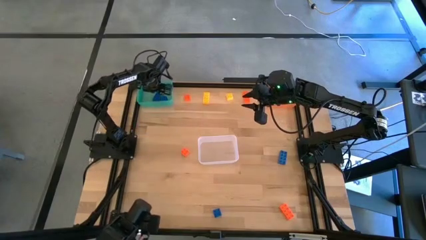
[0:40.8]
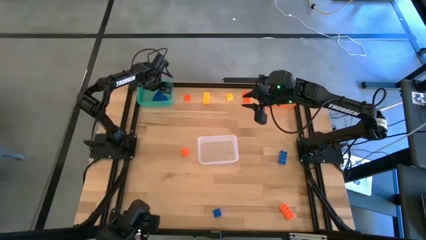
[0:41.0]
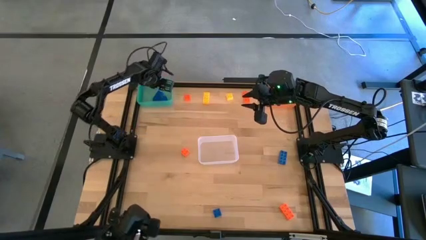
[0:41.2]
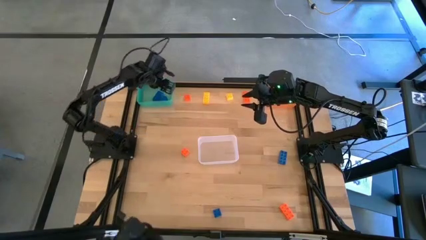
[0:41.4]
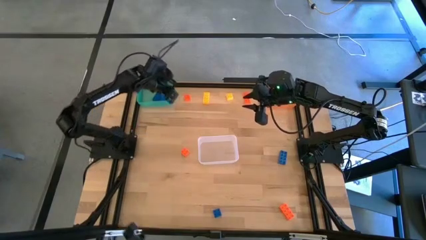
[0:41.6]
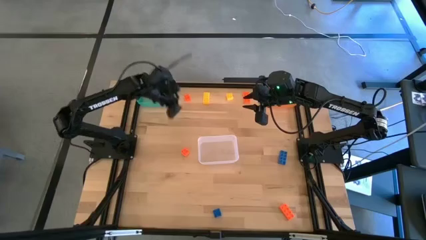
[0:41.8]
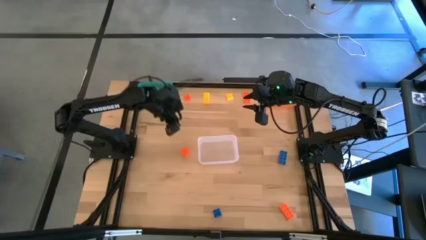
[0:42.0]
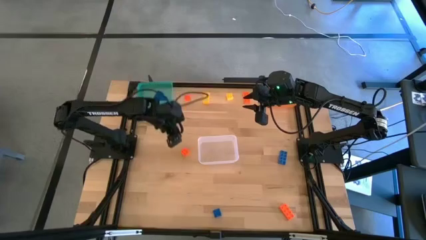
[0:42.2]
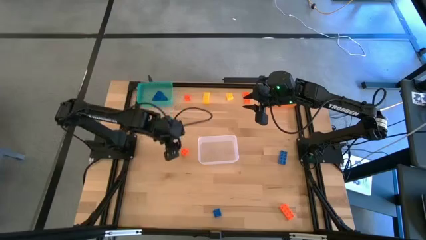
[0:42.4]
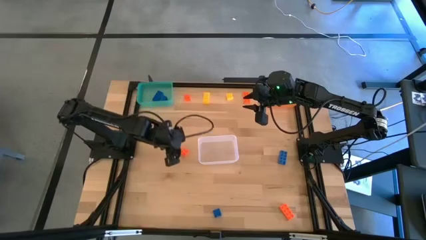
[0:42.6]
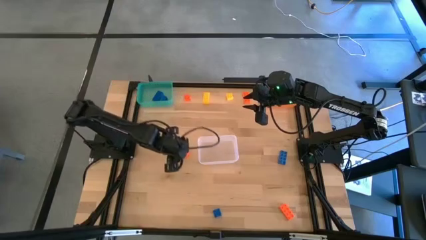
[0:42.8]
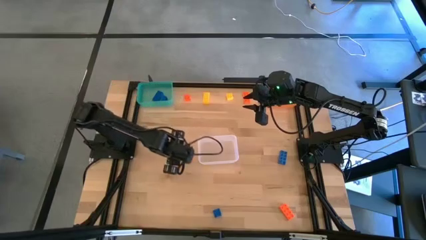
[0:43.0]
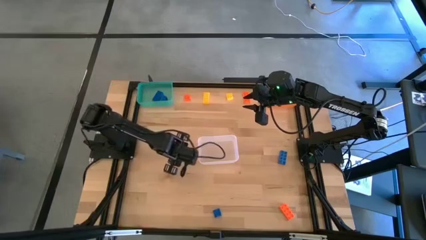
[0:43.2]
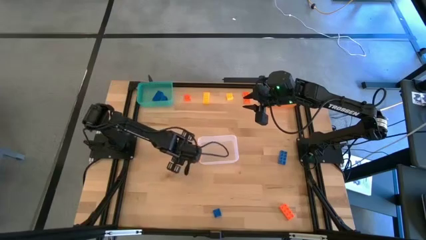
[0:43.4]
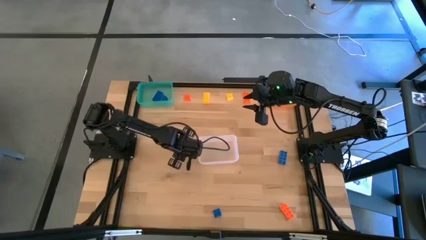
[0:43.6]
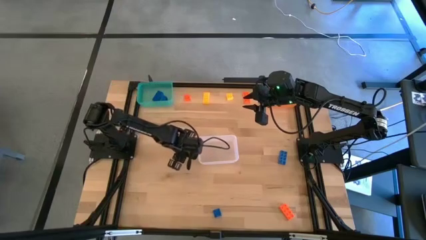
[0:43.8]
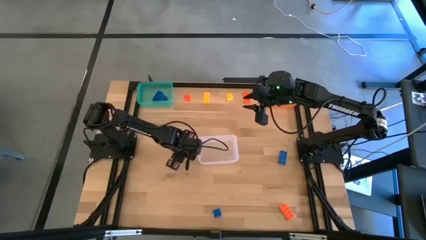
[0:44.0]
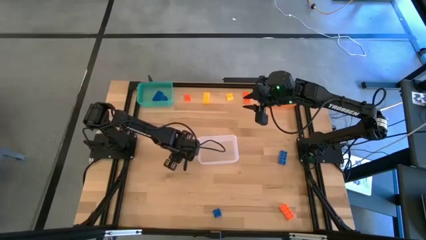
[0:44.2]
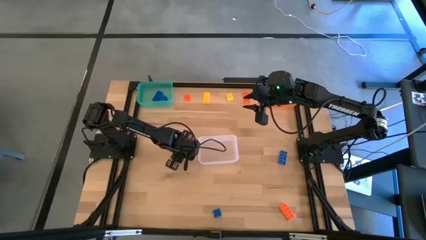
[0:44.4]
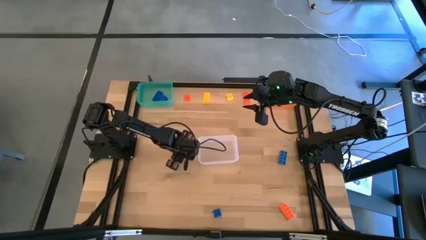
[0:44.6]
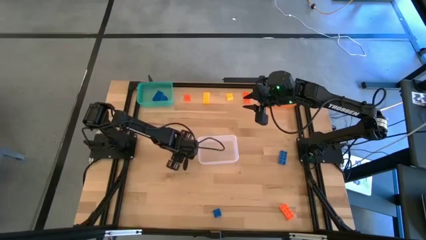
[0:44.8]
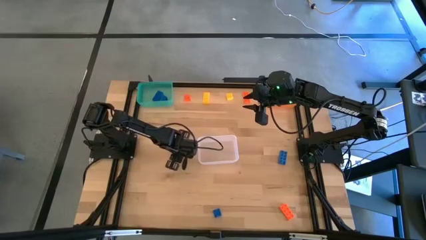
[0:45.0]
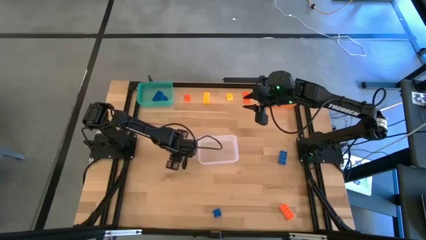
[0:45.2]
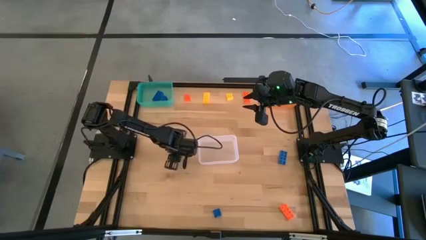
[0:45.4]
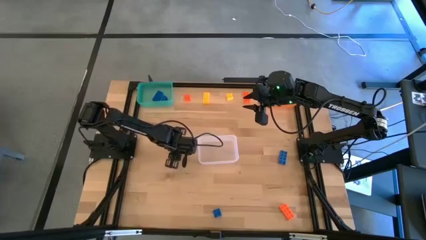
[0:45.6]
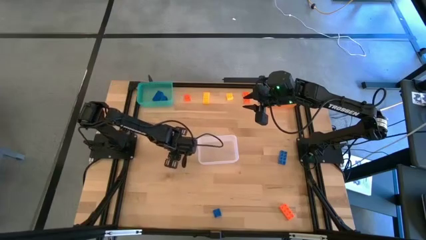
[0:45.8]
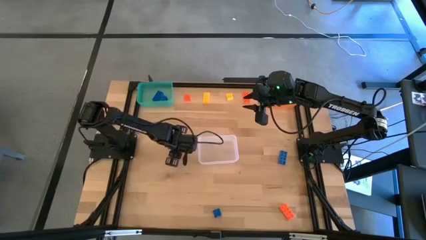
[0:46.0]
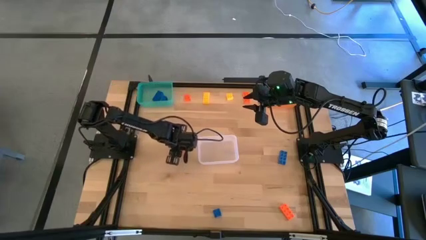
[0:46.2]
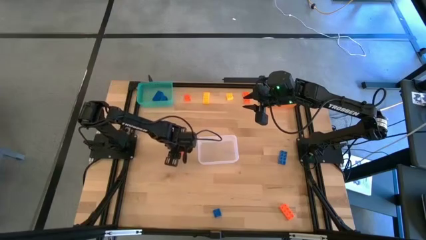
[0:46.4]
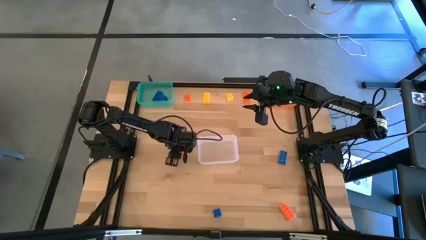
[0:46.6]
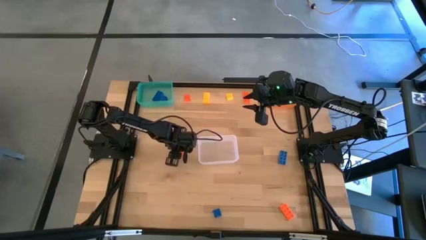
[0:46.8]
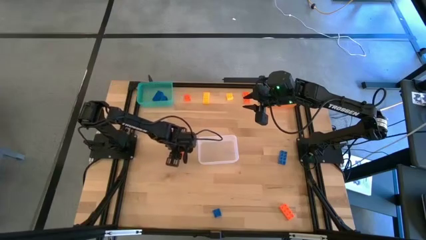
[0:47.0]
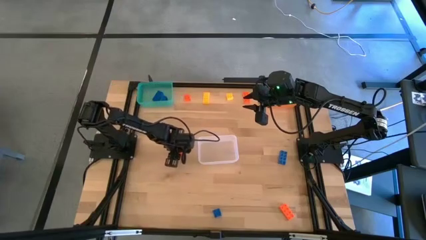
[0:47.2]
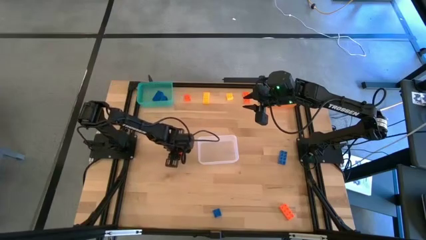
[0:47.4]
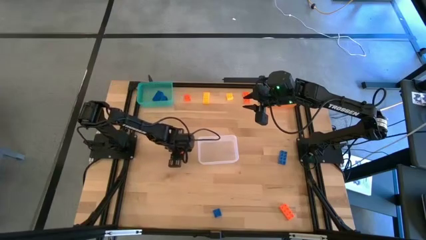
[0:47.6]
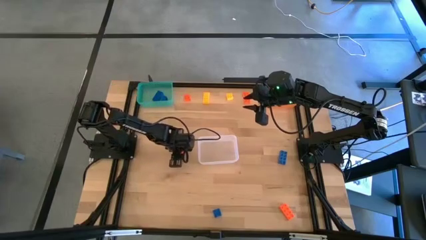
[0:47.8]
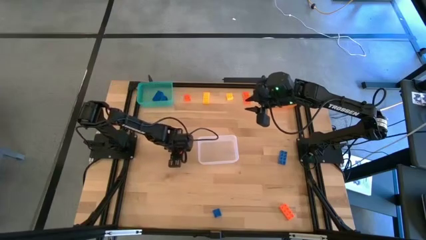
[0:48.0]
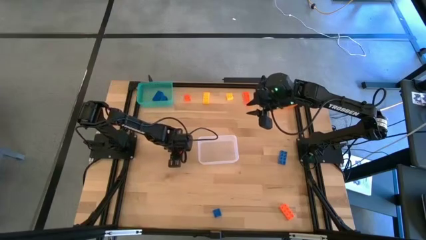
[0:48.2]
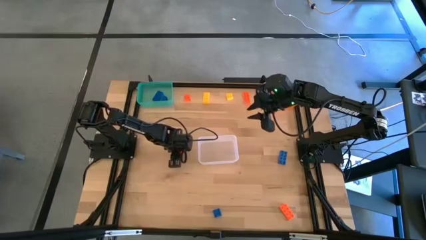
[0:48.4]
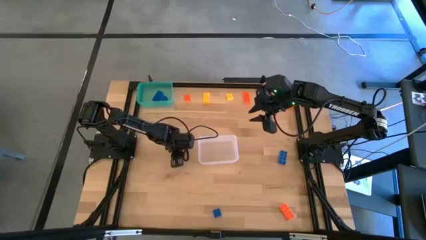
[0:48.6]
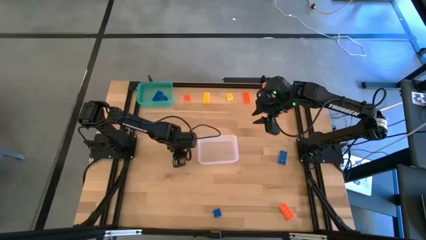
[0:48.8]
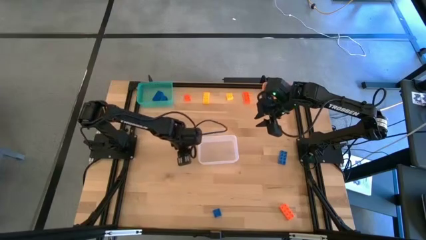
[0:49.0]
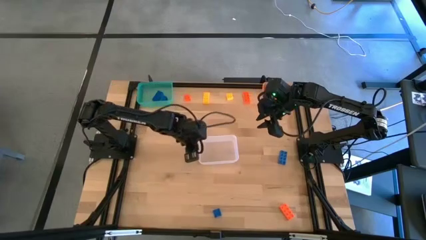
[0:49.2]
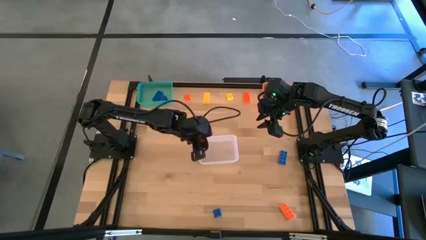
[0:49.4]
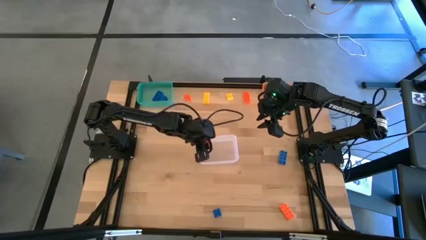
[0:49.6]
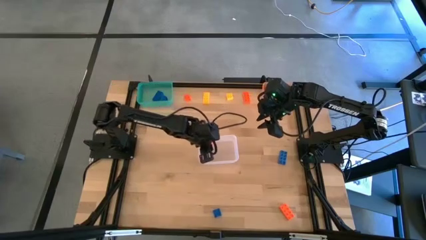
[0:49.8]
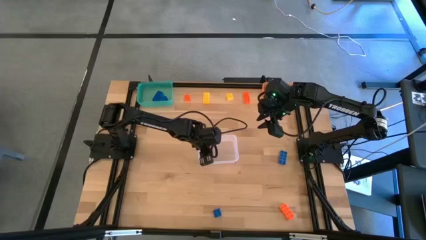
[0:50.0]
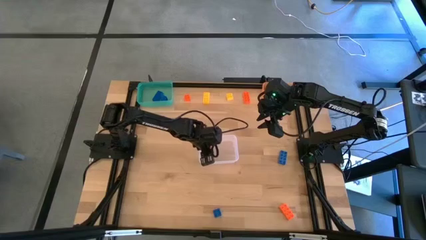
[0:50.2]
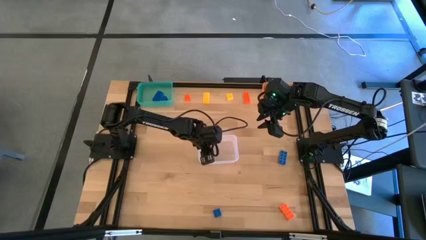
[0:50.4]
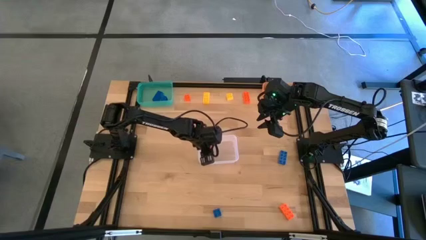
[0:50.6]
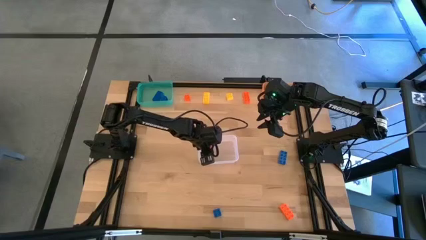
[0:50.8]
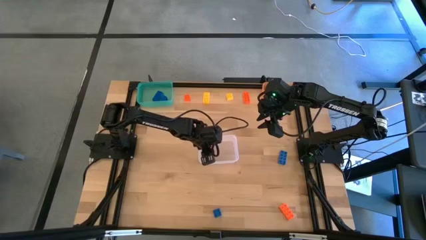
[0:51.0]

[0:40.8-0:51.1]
Task: Sort & place blocks by color
Put the left center orange game piece into the transparent bin

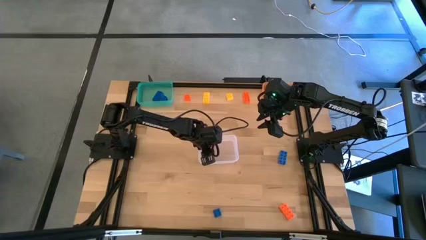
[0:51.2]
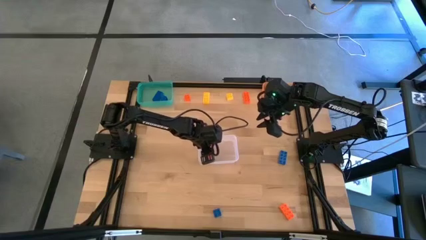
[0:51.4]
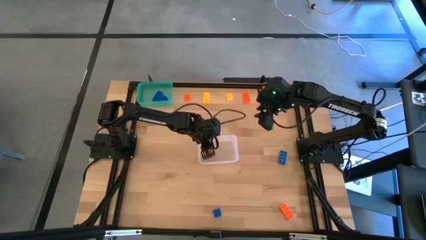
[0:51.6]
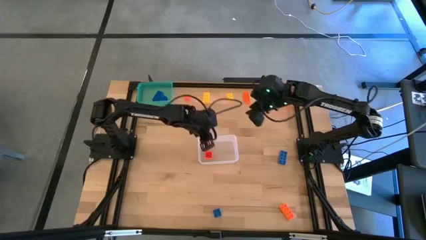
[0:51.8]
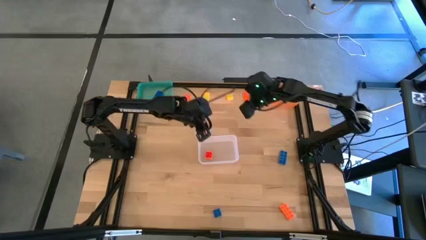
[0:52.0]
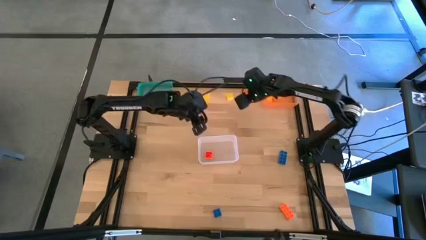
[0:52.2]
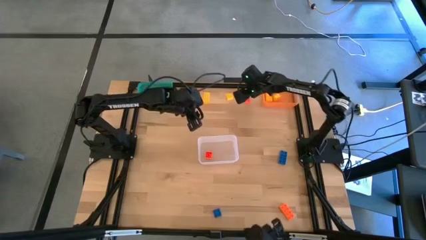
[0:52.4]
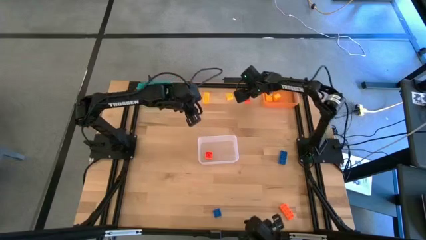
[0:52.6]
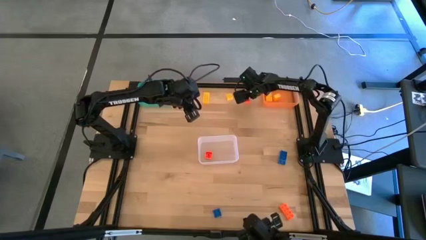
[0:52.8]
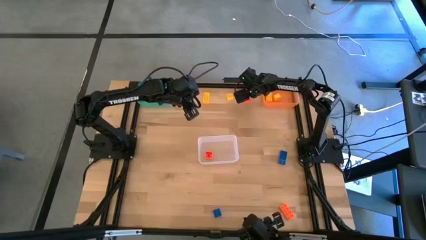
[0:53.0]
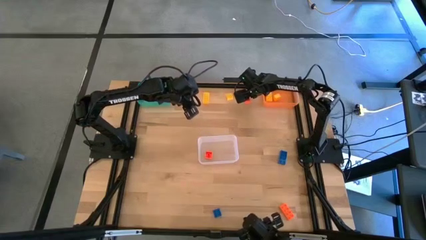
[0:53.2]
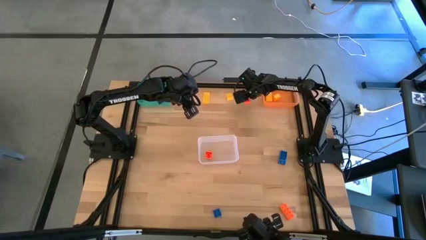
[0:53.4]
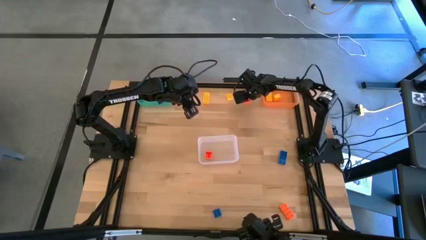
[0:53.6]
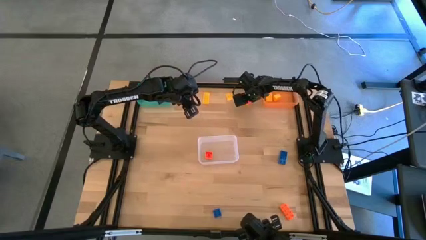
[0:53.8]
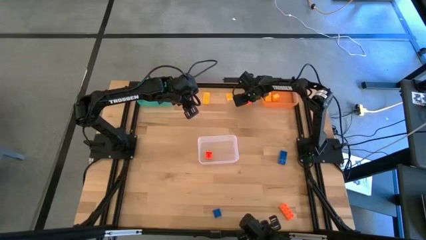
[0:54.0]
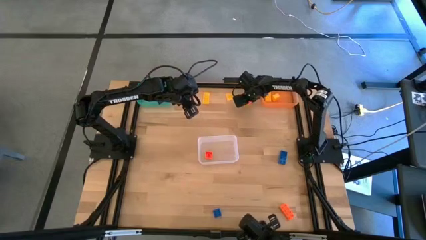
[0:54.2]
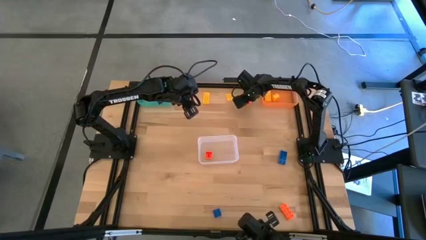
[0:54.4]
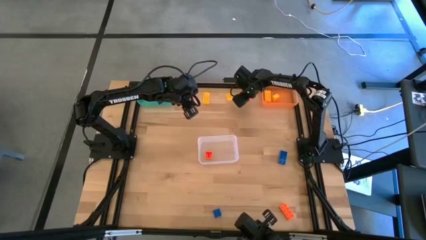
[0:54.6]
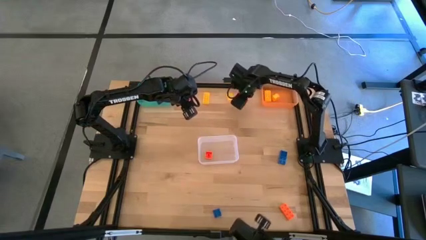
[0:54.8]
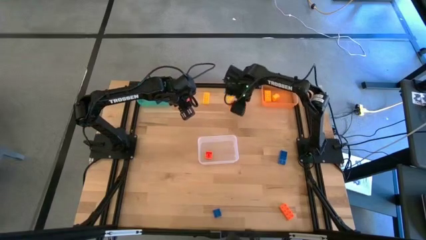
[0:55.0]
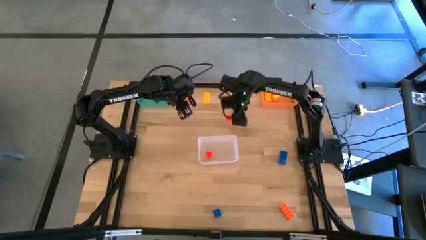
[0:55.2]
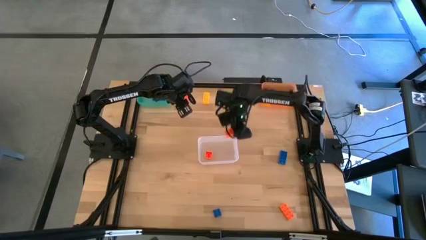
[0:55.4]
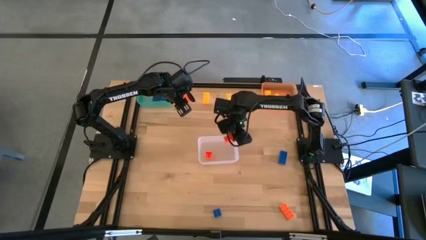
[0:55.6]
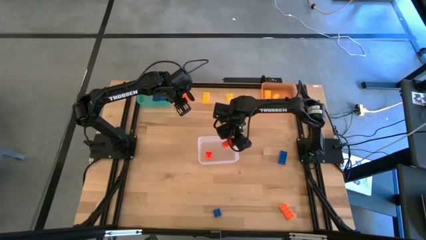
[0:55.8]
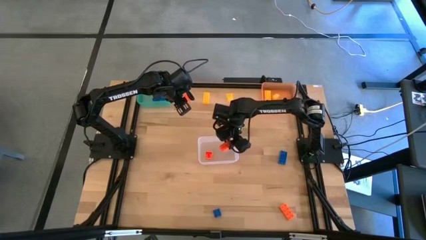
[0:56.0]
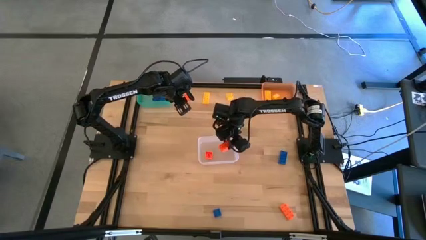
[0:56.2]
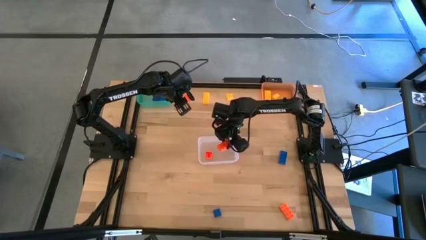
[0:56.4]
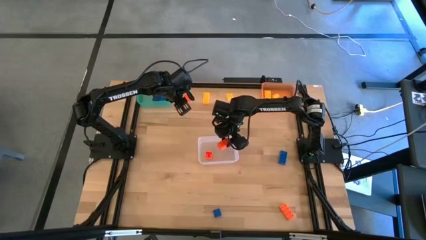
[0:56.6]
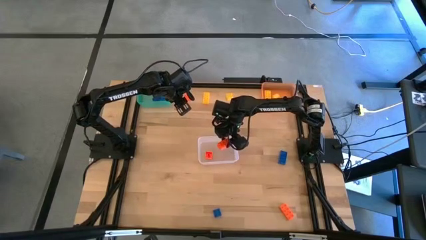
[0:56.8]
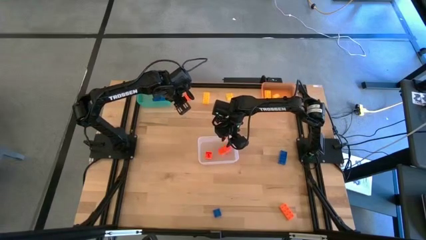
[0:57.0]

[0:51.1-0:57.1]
Put the top right orange game piece into the transparent bin
